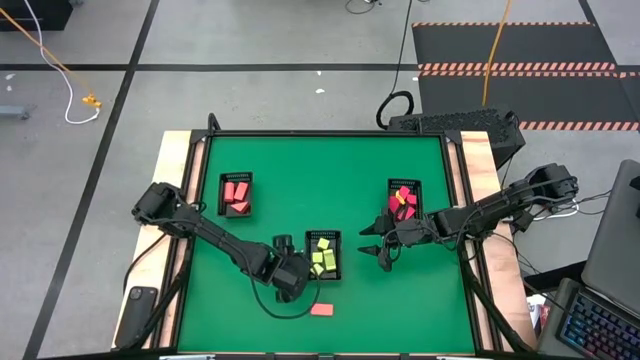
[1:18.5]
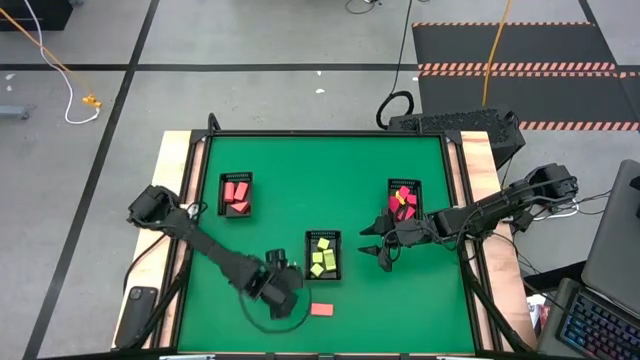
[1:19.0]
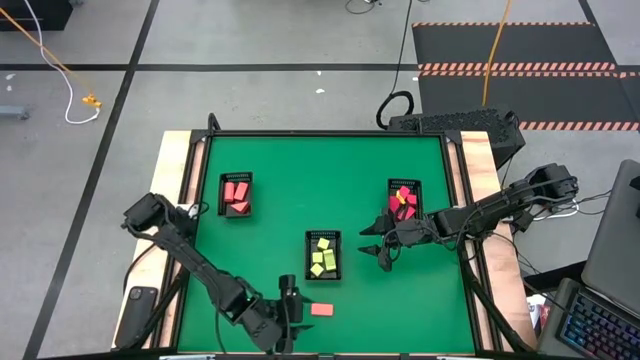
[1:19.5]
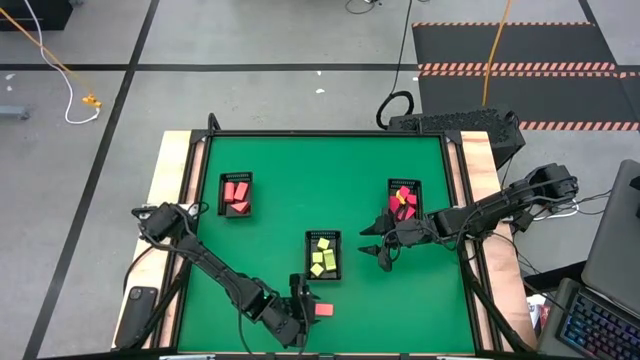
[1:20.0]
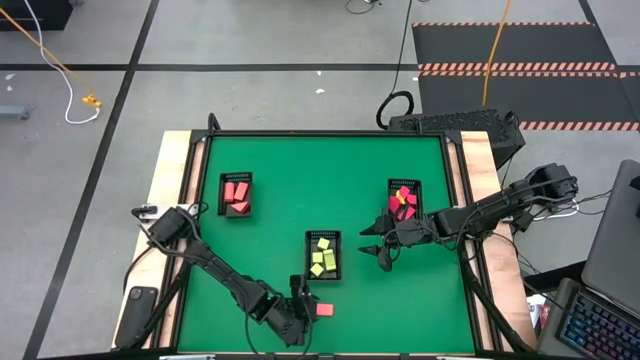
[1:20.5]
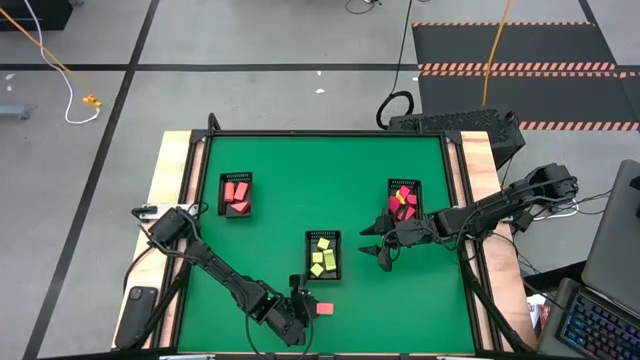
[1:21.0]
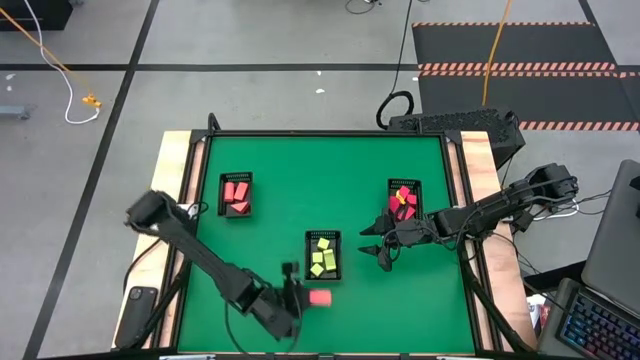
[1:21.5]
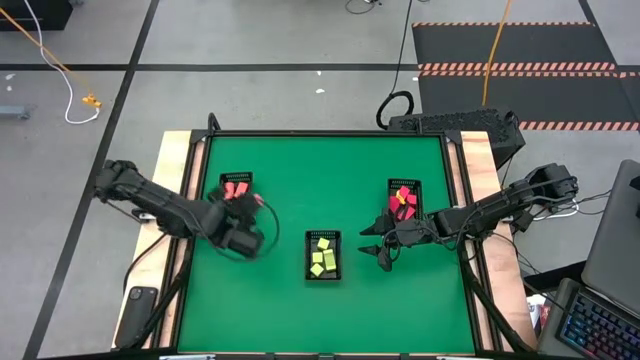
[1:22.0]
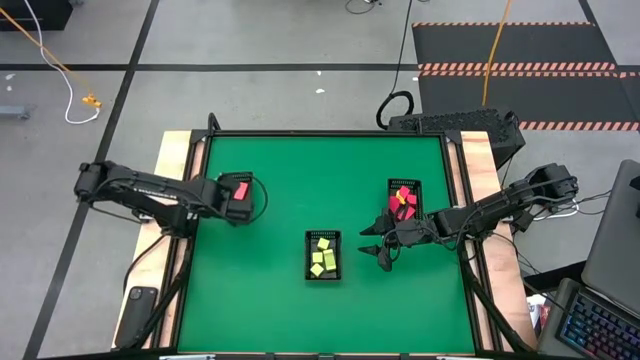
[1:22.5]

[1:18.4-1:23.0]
Task: Sort & place blocks by color
Put the pink block into the top left black basket

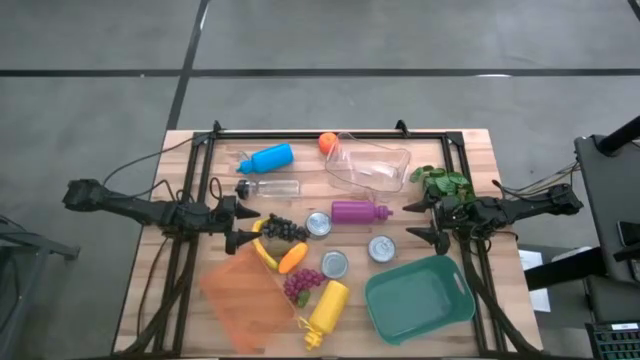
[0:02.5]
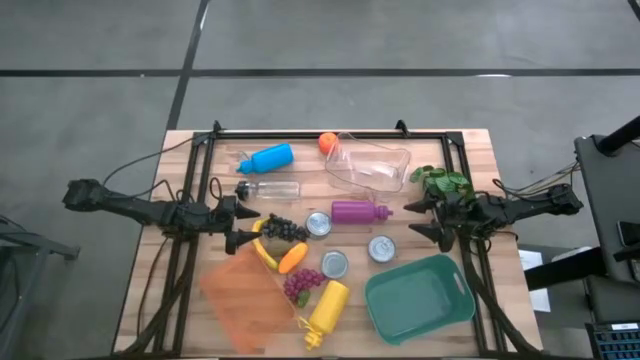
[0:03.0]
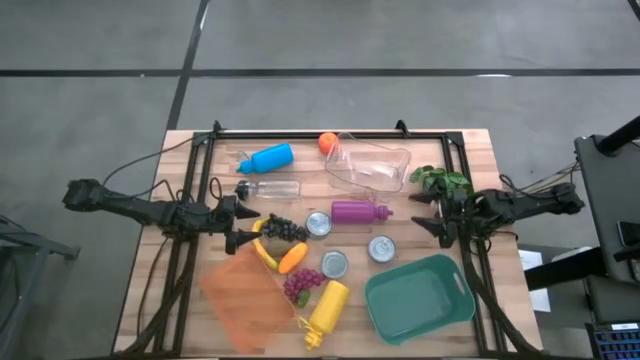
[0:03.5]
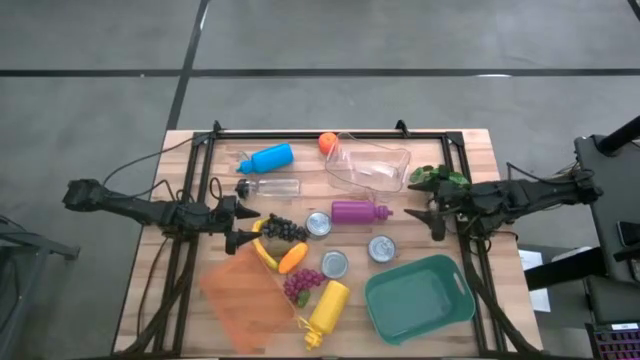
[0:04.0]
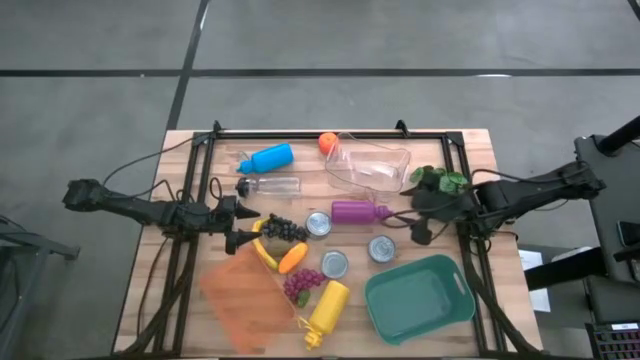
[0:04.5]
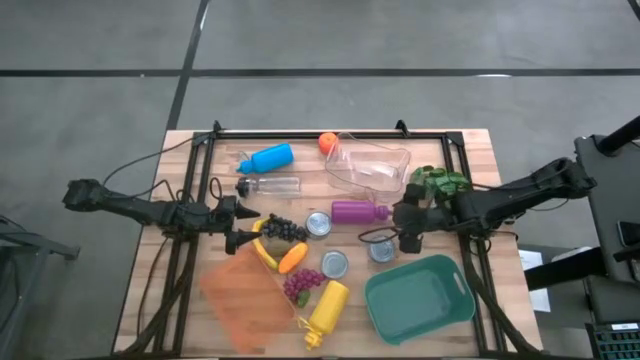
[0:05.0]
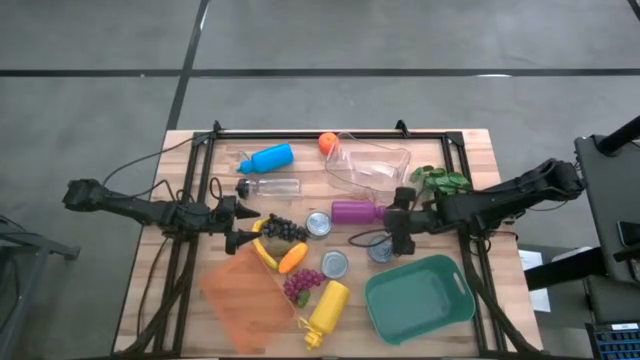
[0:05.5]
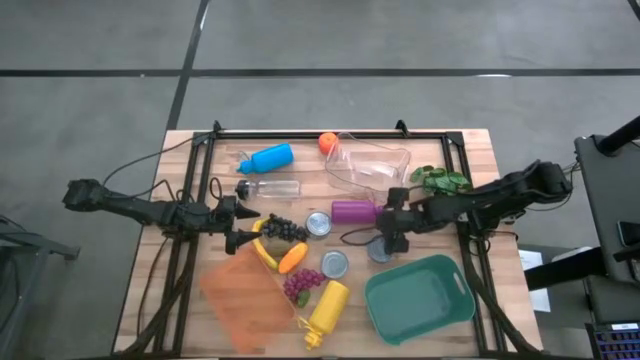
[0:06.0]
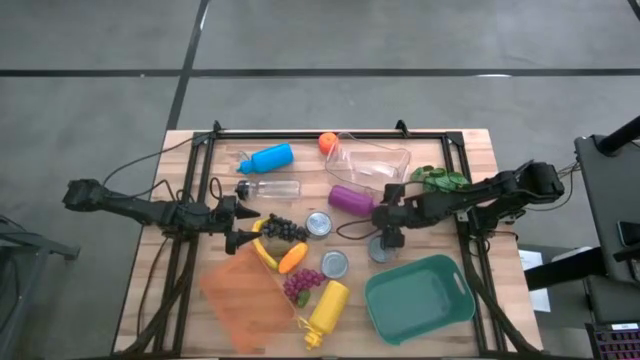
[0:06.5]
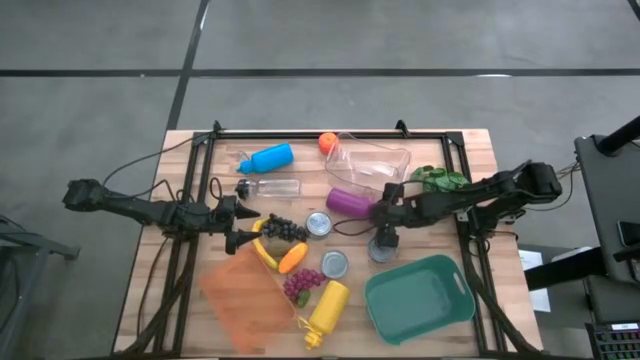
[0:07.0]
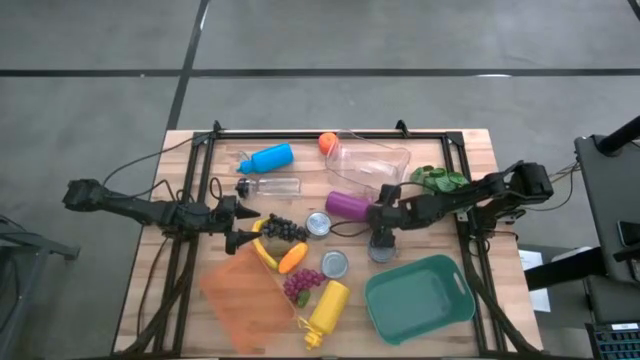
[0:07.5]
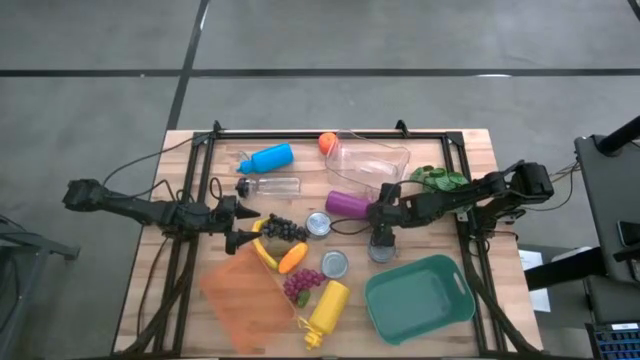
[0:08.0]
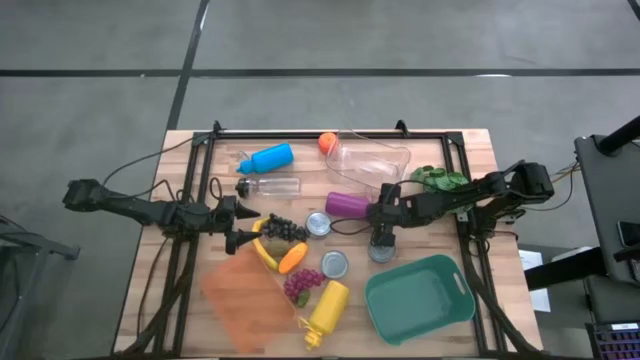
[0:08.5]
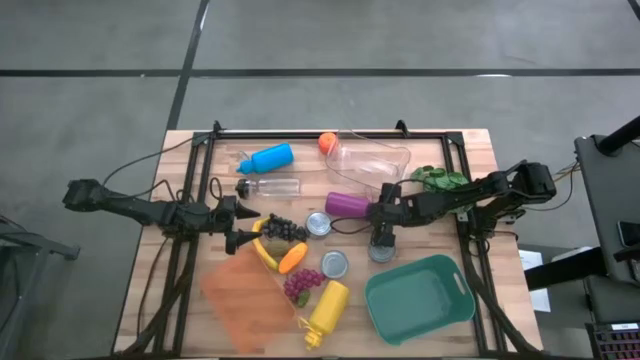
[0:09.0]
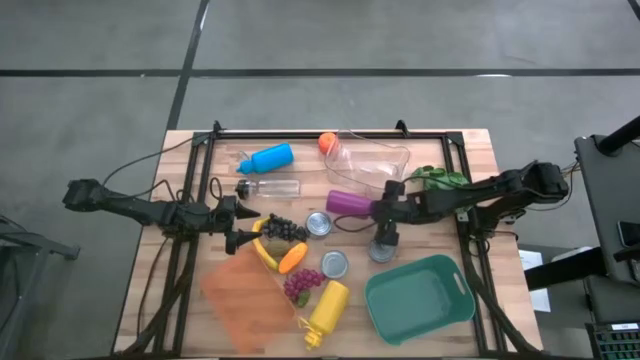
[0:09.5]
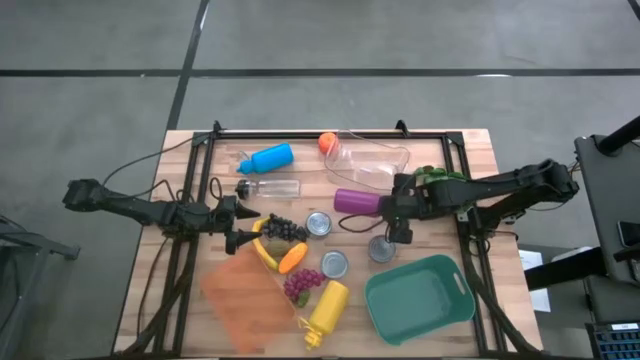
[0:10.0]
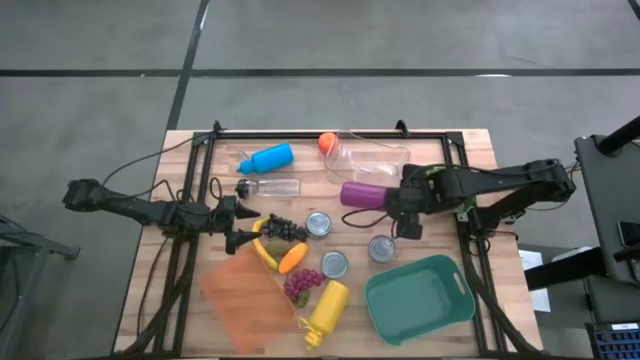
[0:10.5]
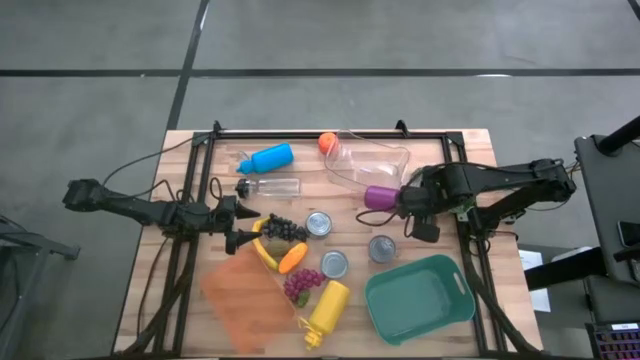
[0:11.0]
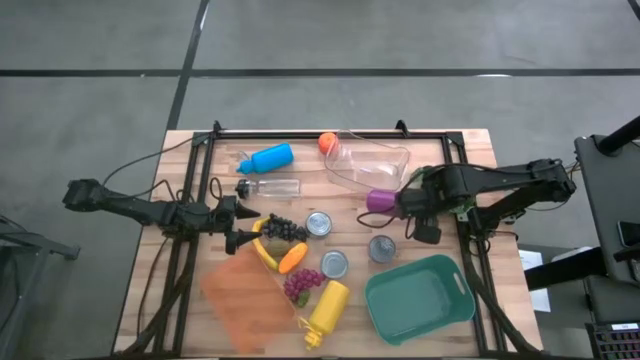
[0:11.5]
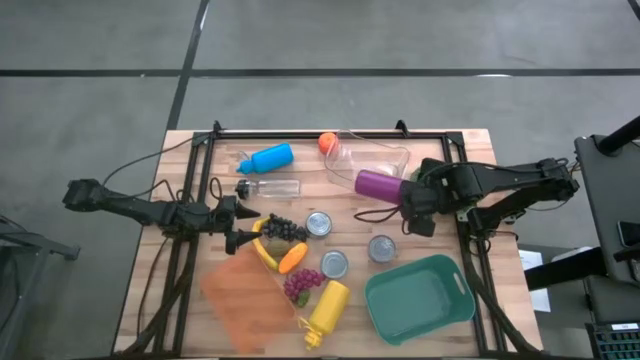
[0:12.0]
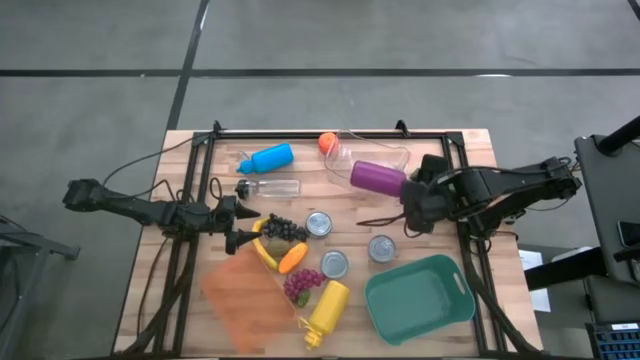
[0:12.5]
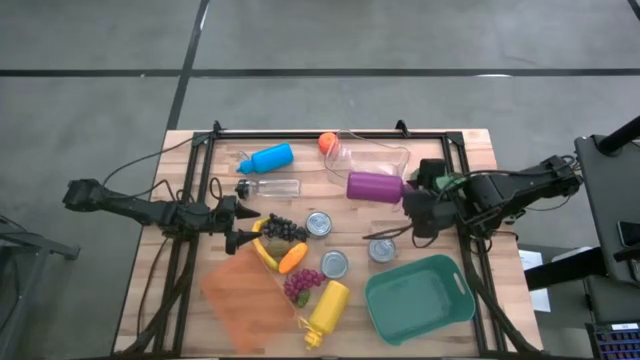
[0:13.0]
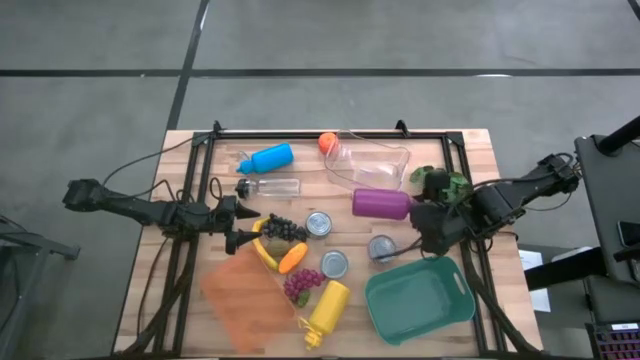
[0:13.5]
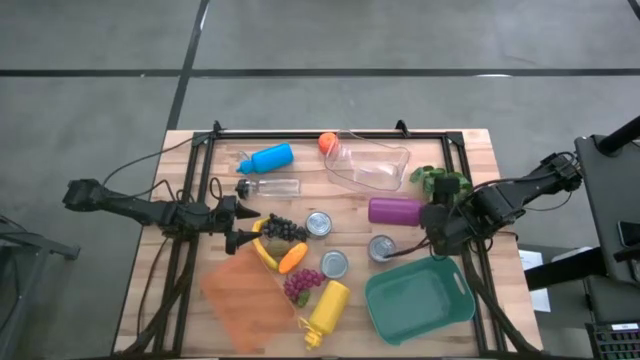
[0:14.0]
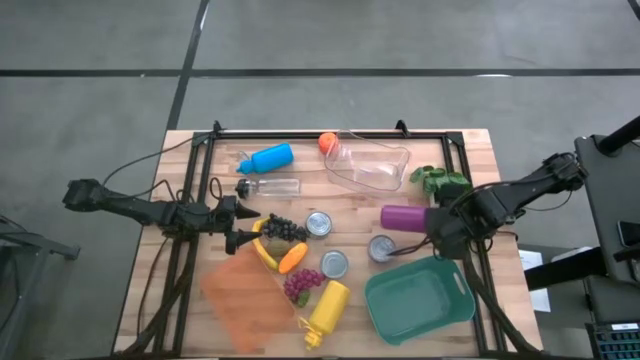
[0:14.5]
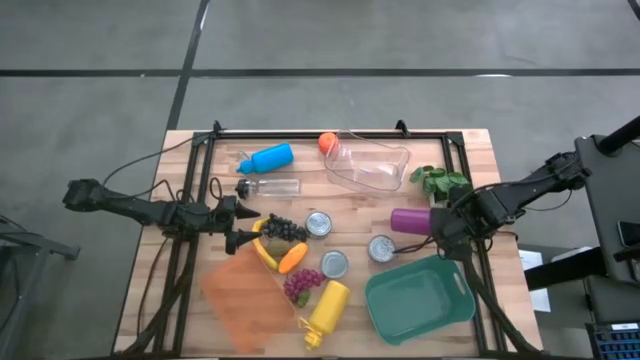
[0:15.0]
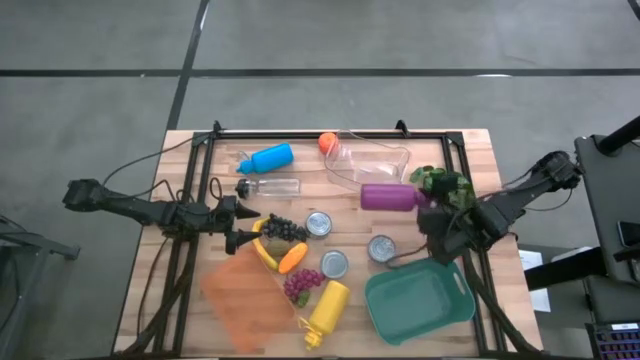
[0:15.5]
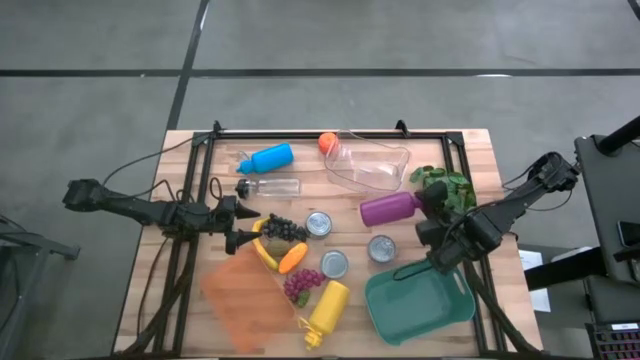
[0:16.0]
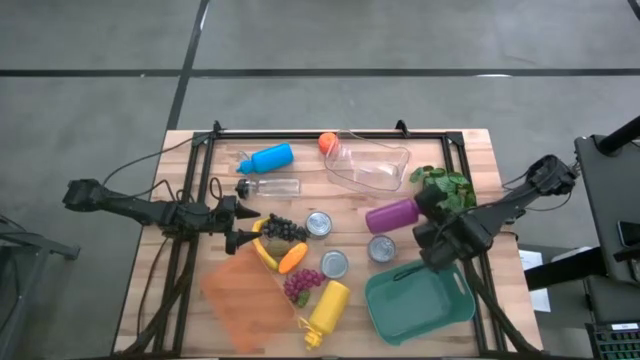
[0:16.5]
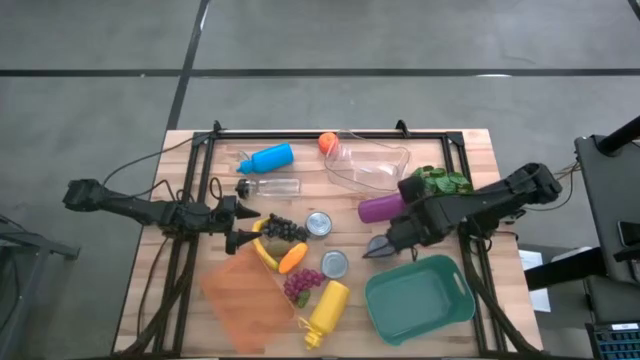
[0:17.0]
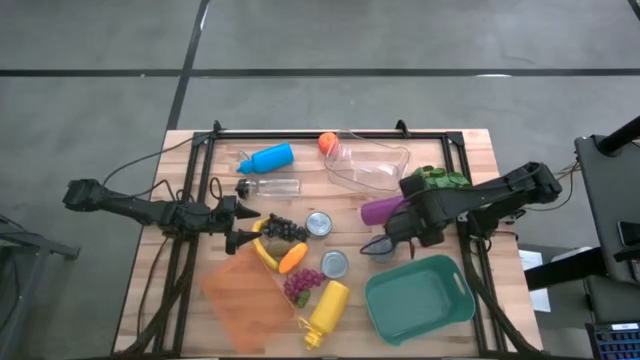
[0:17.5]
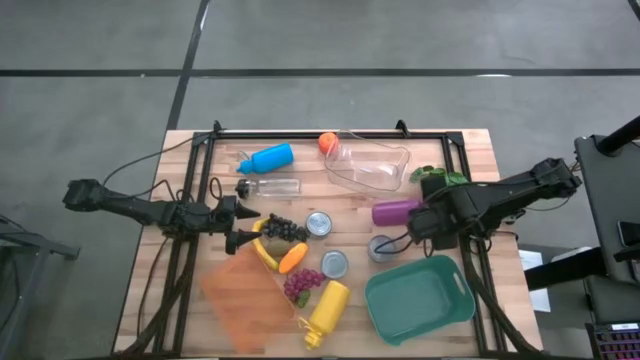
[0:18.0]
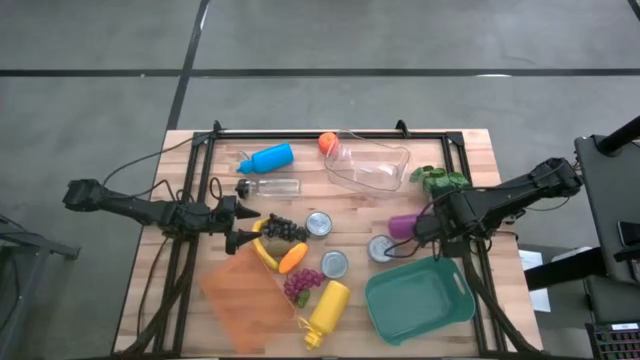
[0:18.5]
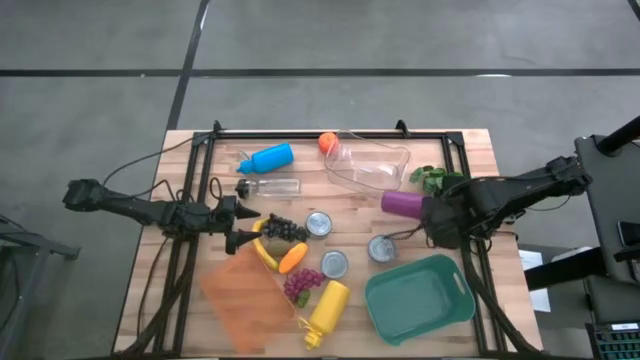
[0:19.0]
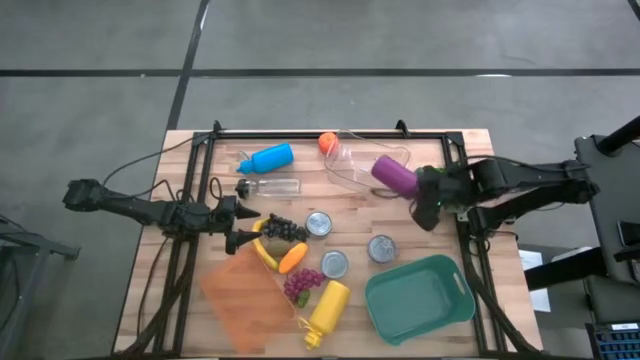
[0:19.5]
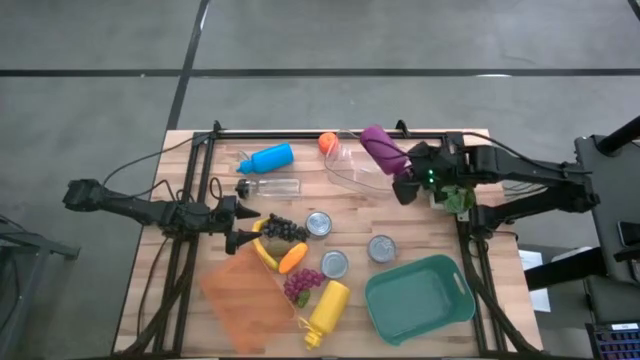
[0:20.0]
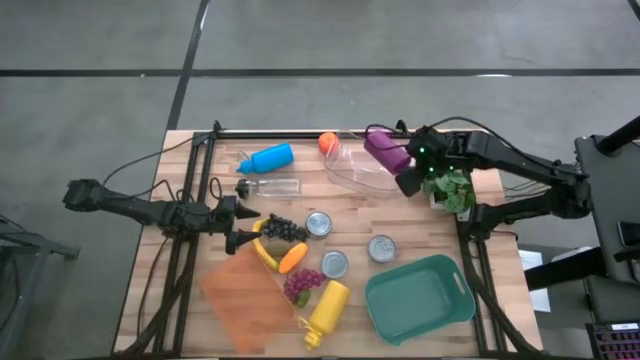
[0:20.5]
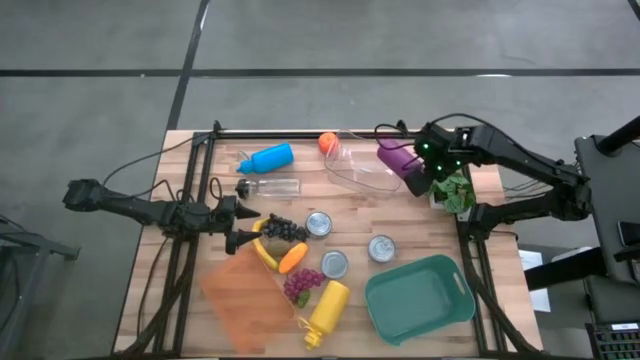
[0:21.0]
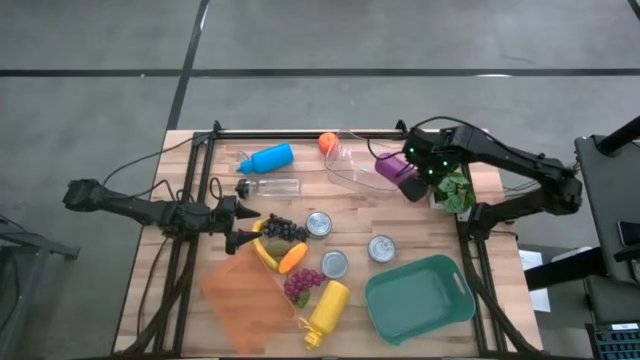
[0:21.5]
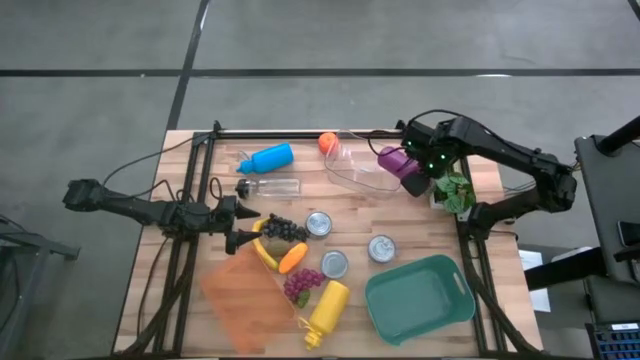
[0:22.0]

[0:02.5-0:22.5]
Task: Pick & Place Food Item
Put the purple water bottle into the transparent bin
